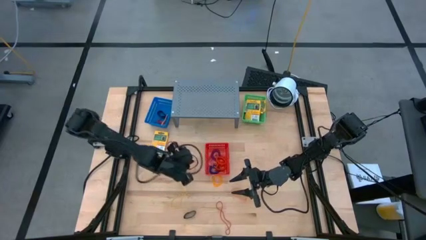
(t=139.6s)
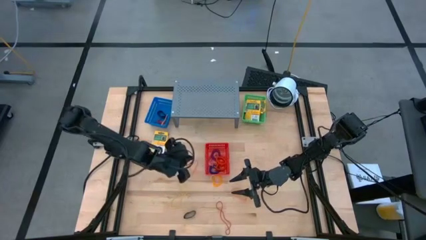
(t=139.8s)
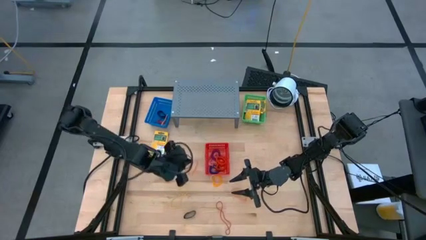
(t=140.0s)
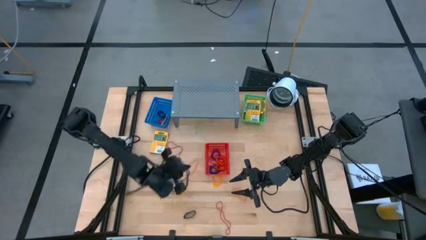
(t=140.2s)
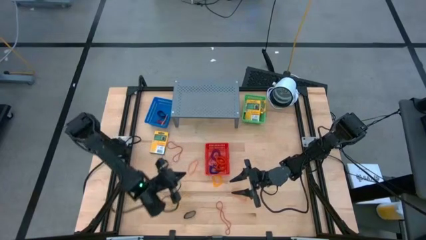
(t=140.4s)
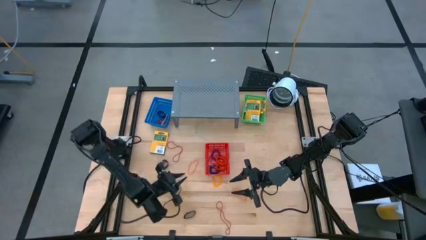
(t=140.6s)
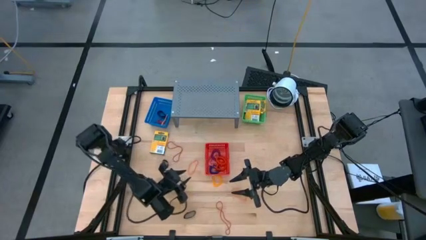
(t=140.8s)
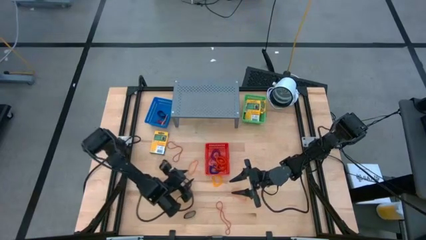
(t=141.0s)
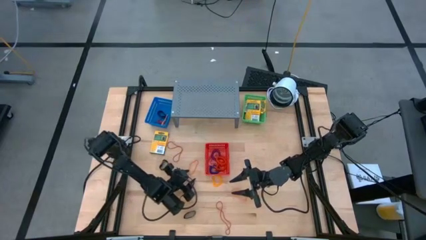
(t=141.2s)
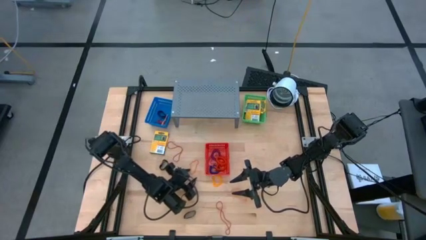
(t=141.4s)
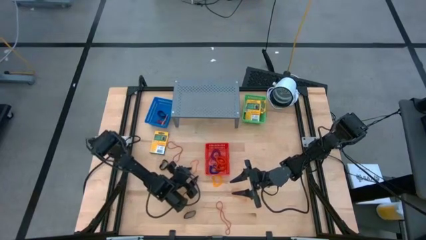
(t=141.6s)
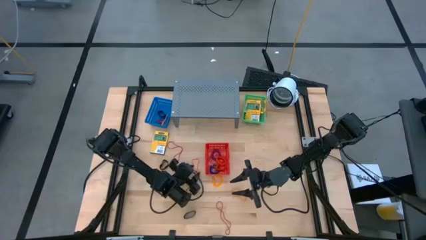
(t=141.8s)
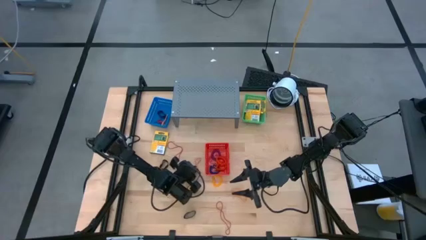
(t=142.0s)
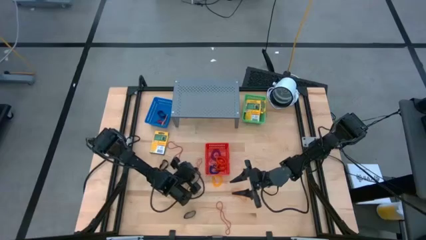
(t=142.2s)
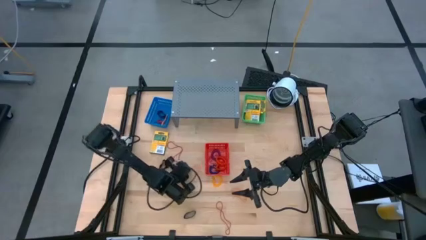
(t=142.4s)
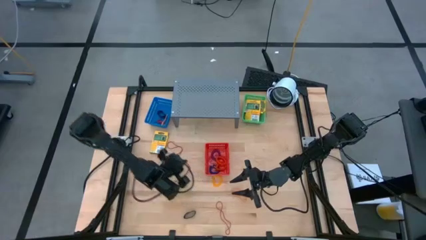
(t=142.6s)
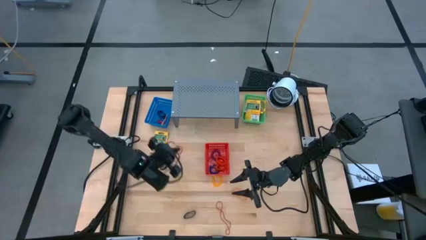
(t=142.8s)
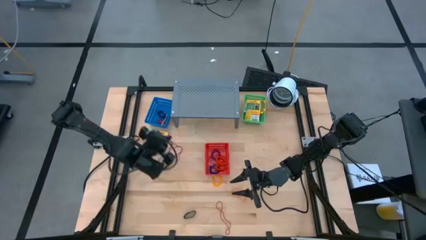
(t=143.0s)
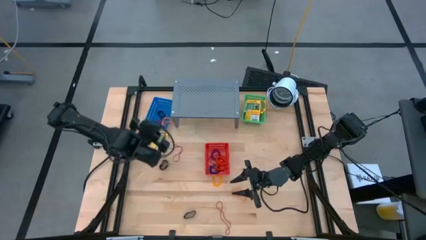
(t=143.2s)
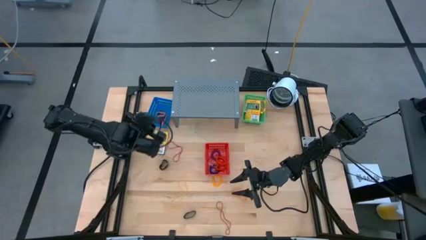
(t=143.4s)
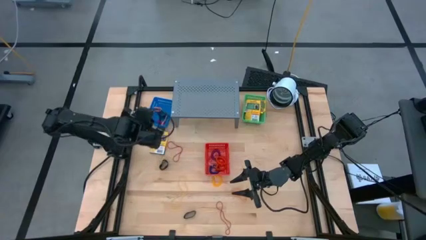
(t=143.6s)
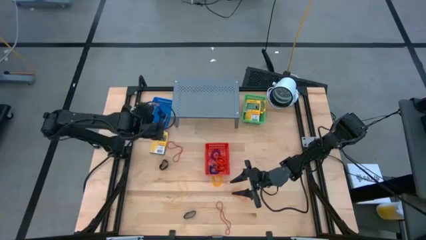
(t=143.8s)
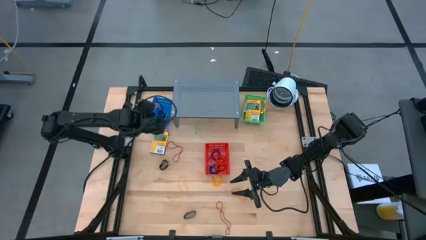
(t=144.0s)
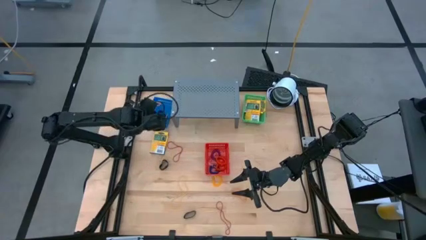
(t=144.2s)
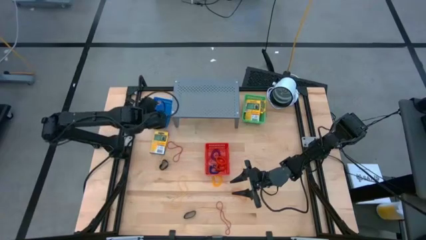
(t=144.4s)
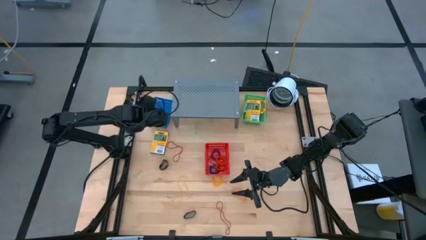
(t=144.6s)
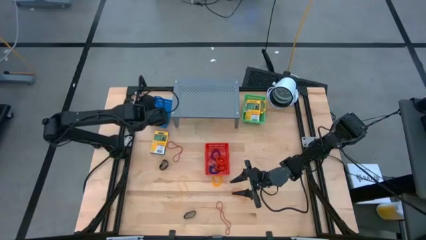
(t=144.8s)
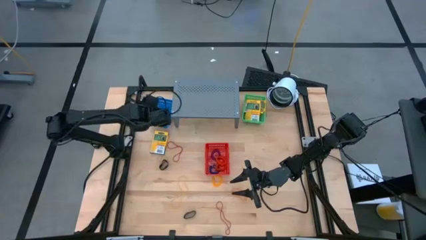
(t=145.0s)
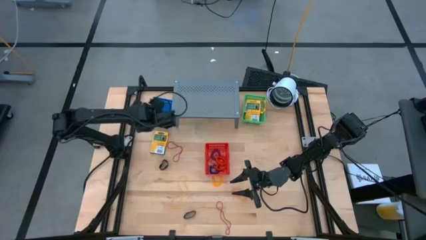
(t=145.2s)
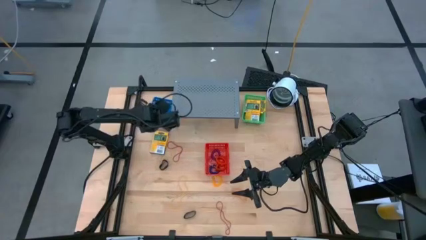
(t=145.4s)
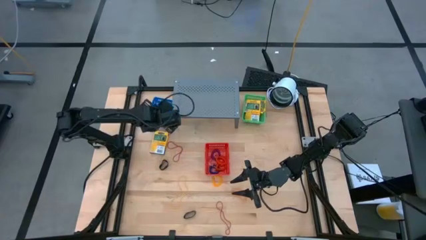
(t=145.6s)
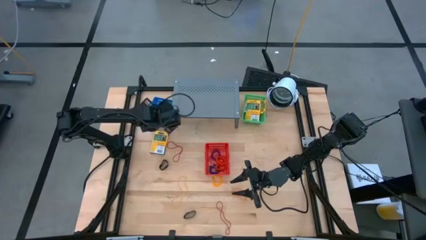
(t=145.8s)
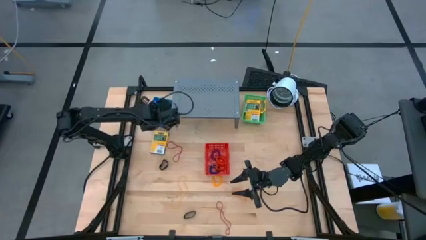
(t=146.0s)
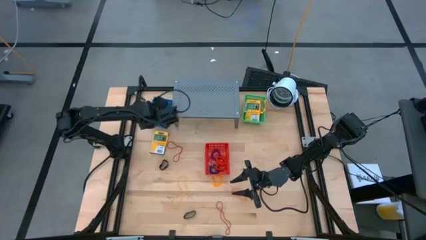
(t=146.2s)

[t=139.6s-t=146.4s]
Task: Pick & Place Office Desk Supplies
Put the top left orange rubber band into the blue basket

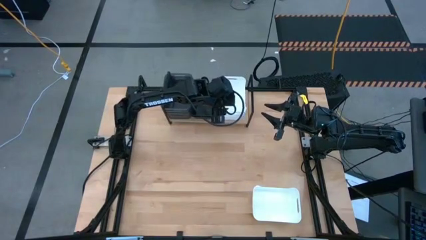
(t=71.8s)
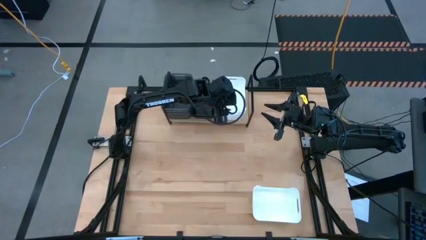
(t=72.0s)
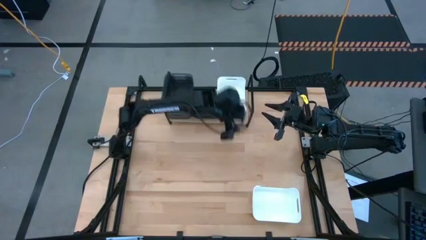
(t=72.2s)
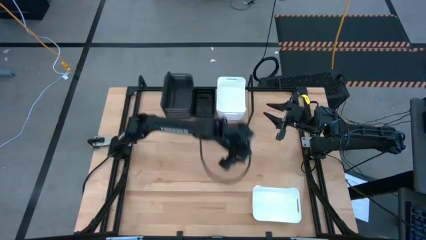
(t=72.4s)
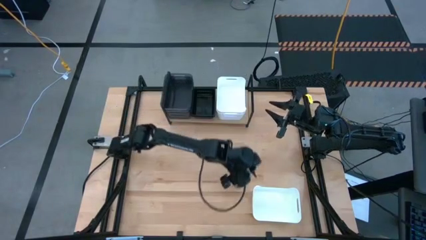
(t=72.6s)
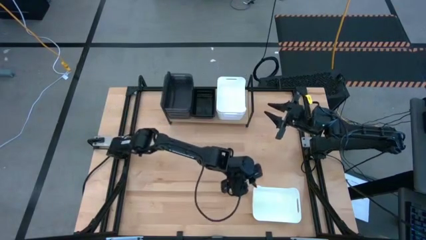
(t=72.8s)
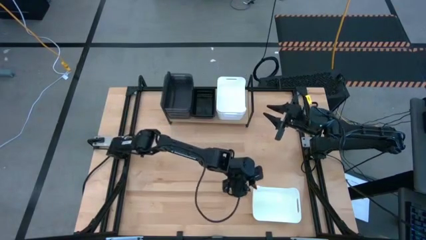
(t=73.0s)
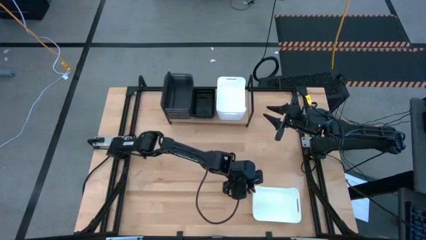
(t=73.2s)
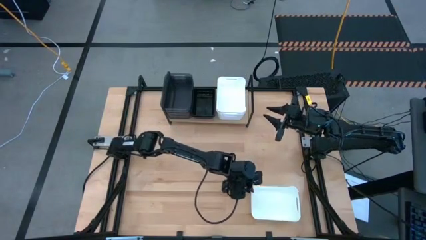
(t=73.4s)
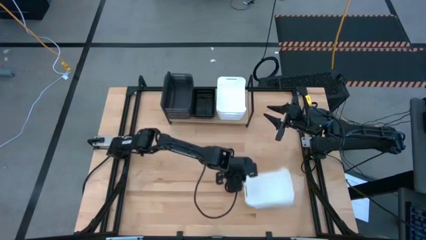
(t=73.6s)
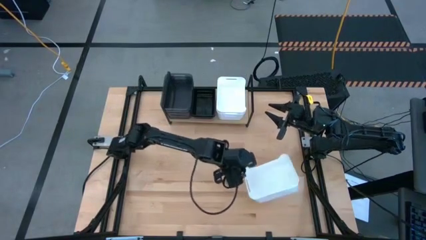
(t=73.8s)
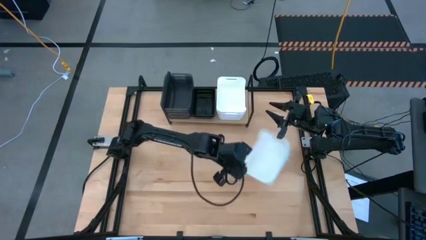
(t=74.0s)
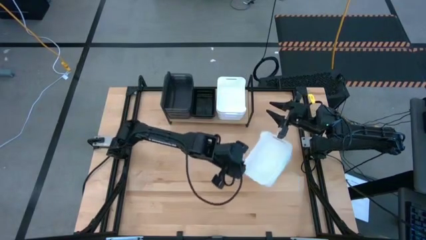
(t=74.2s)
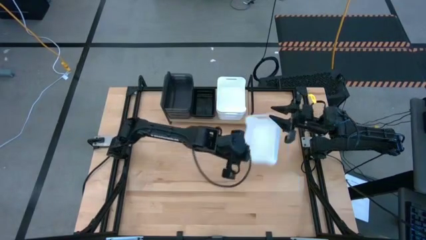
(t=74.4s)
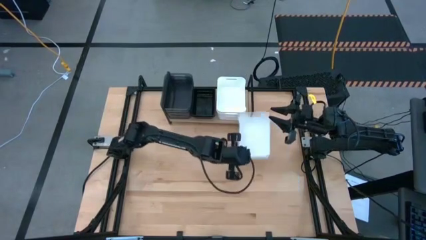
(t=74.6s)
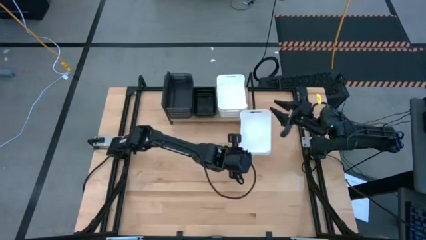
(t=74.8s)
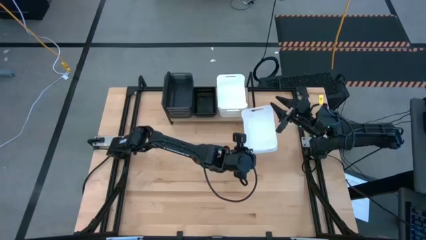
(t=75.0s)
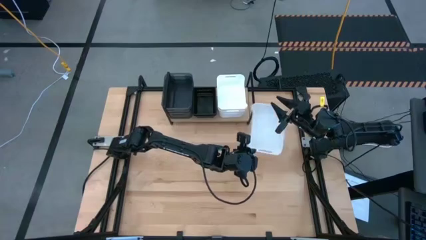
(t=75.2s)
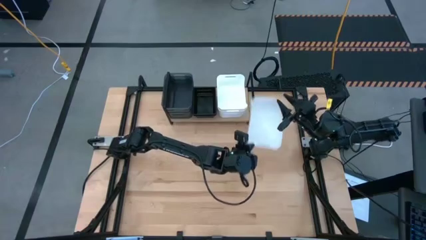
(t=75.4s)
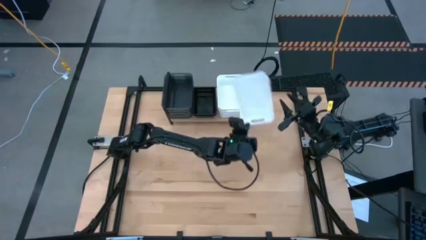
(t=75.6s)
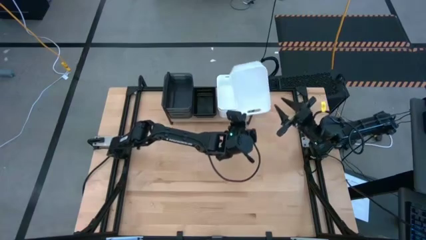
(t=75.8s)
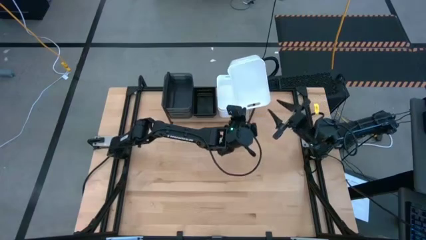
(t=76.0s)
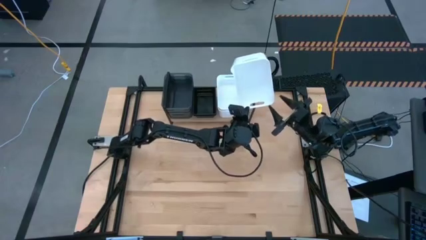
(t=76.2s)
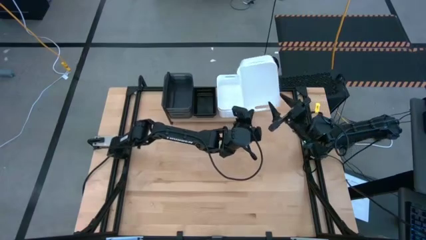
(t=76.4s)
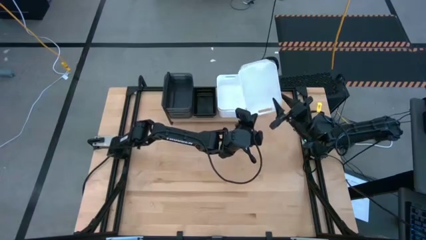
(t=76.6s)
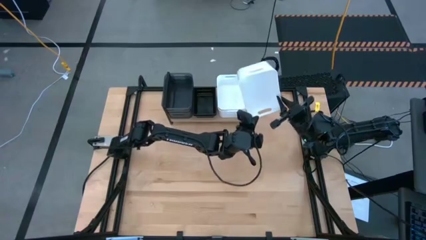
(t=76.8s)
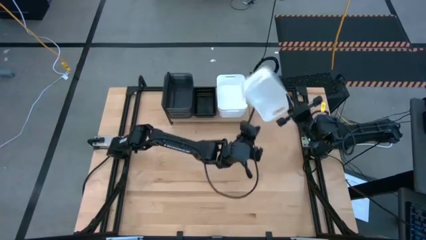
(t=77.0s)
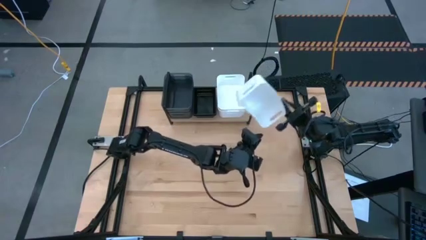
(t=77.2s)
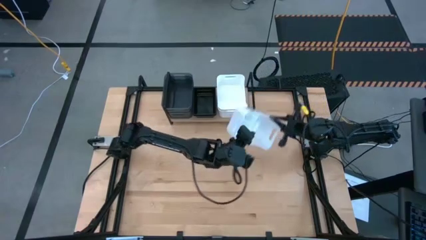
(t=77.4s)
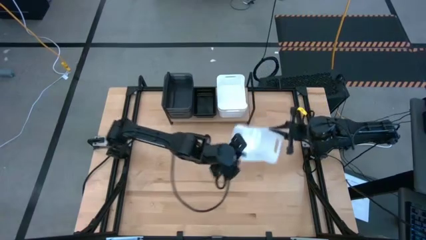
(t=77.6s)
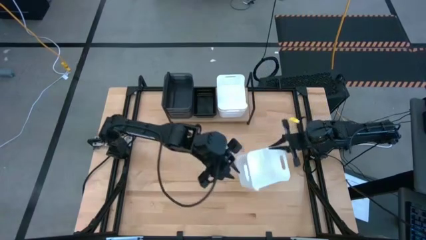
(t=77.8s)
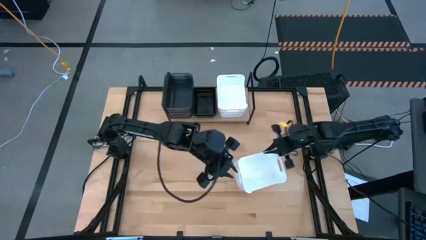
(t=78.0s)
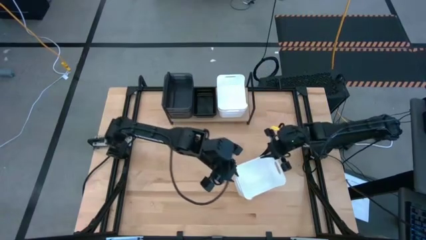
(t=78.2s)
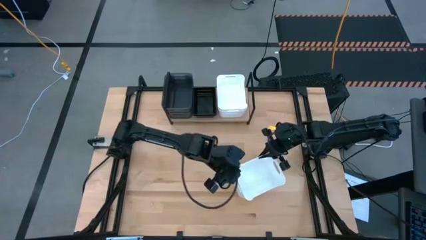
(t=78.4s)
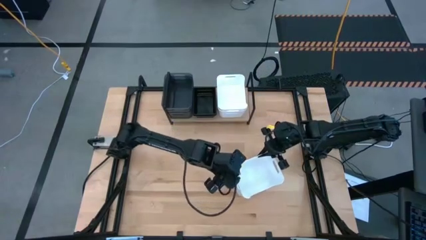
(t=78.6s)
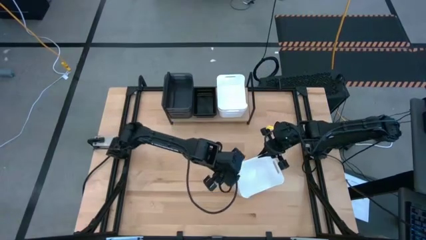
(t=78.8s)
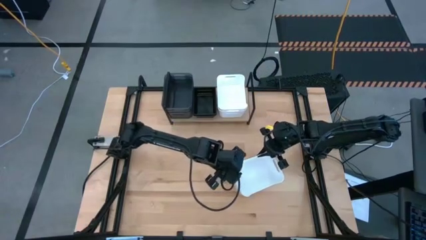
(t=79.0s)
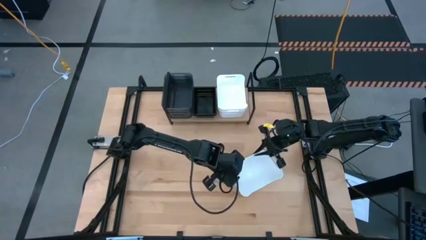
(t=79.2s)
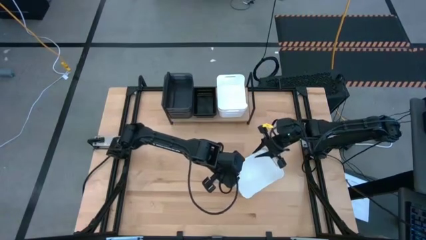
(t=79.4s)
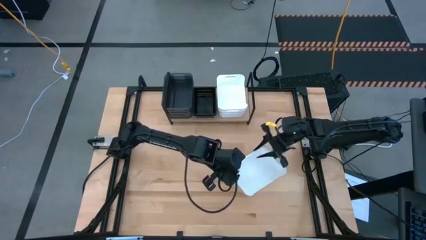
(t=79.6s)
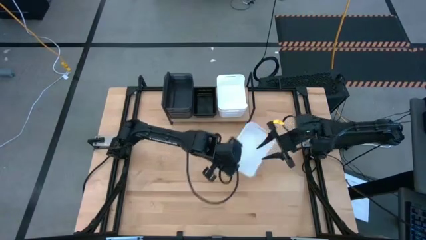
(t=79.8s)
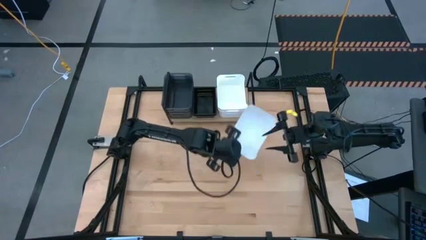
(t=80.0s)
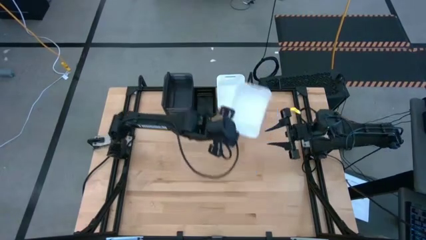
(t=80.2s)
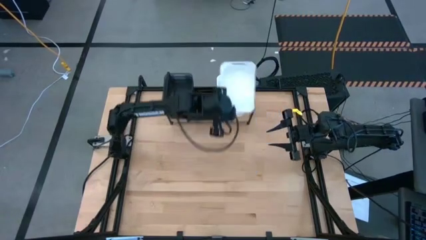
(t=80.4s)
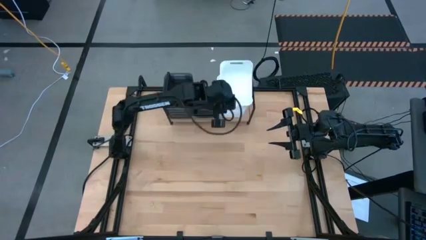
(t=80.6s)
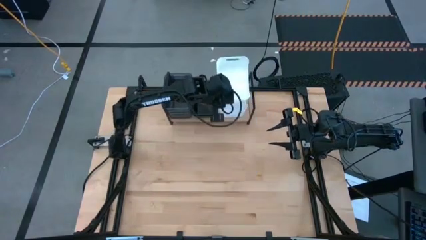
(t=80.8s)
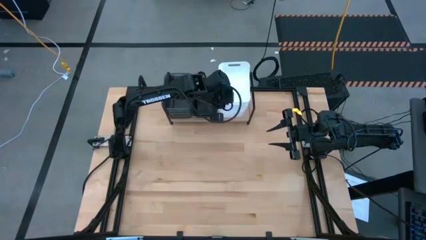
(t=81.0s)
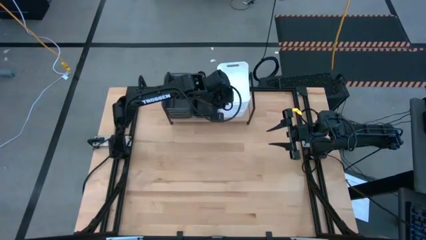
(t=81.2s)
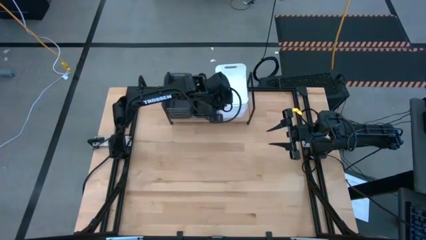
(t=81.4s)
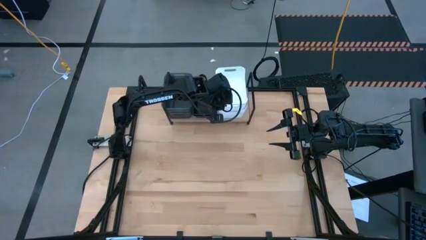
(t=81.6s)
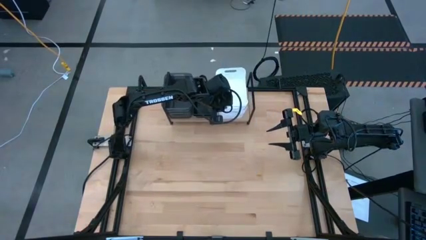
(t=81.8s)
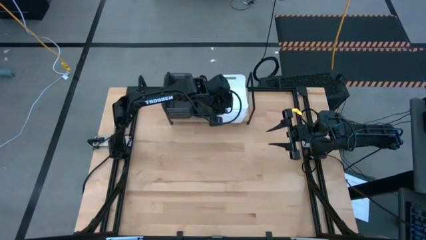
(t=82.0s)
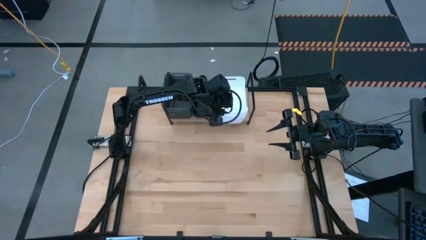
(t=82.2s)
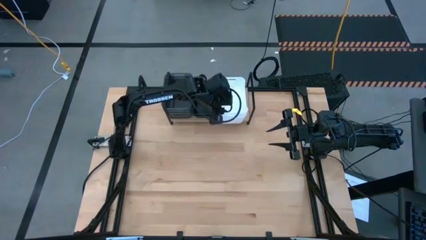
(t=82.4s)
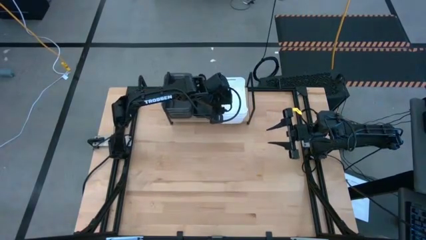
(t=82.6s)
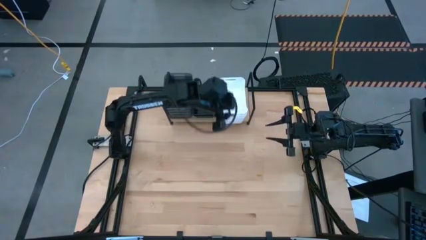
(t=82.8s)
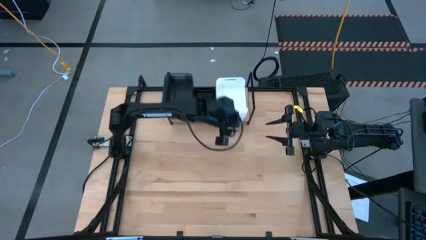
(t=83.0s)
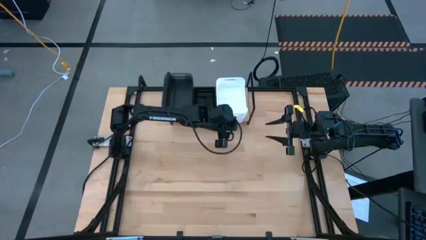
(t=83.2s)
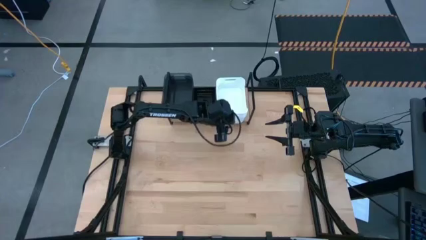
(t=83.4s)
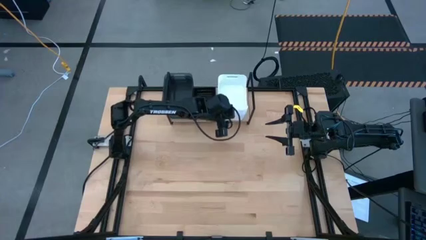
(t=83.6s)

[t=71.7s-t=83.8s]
Task: Stack baskets on shelf by color
Stack the white bin on top of the white bin
